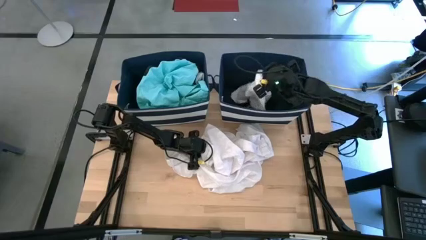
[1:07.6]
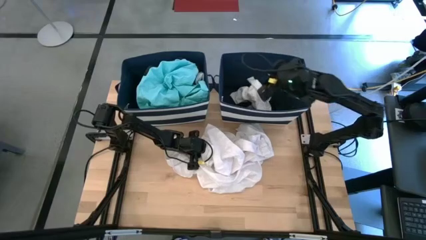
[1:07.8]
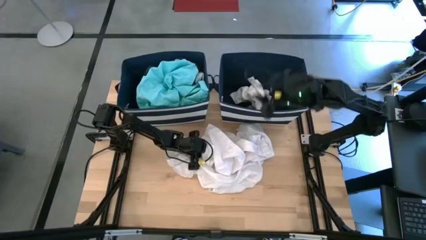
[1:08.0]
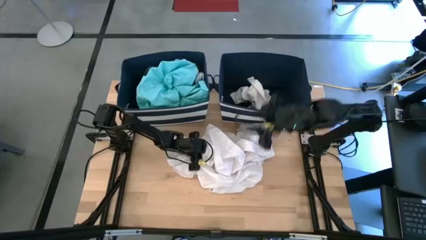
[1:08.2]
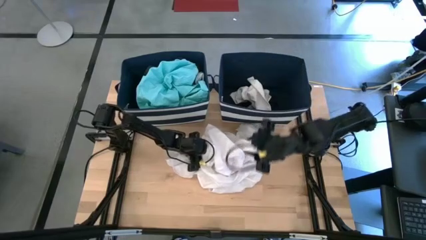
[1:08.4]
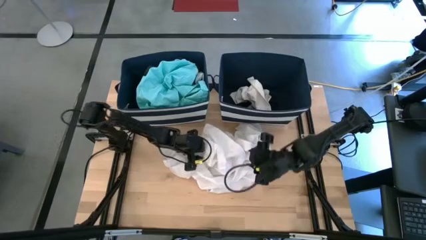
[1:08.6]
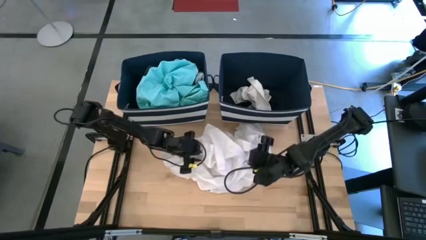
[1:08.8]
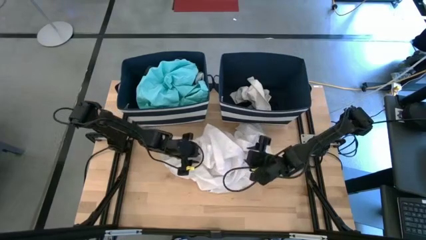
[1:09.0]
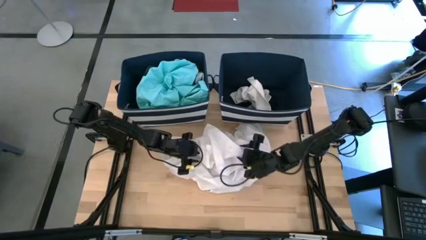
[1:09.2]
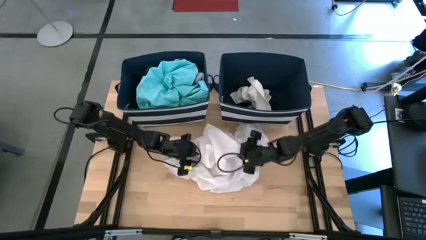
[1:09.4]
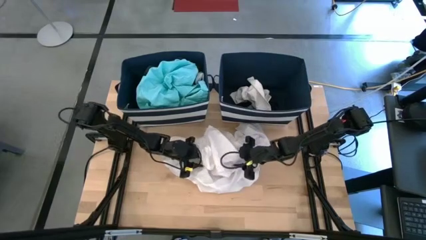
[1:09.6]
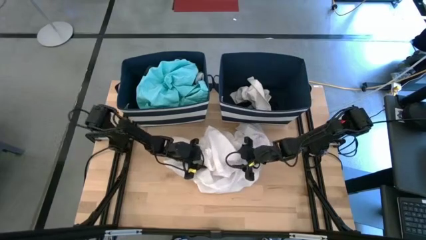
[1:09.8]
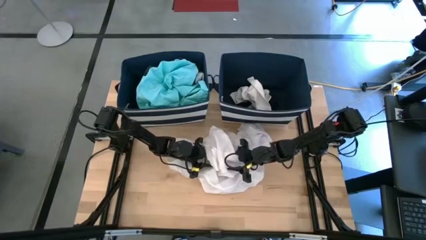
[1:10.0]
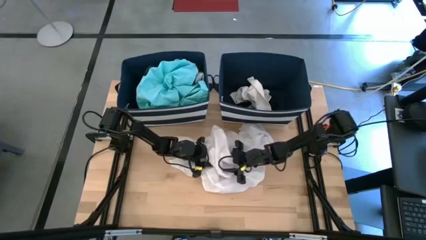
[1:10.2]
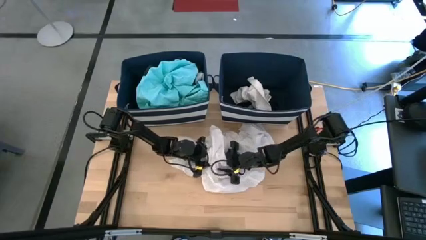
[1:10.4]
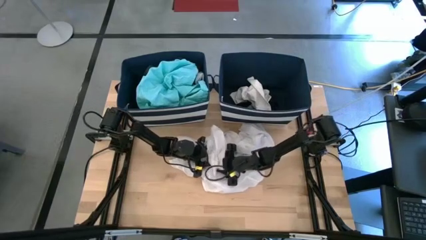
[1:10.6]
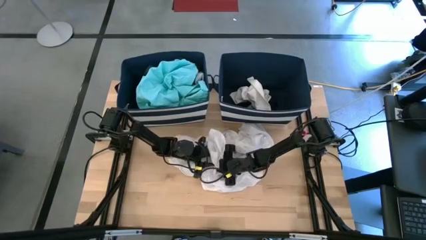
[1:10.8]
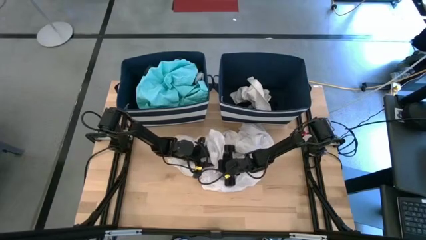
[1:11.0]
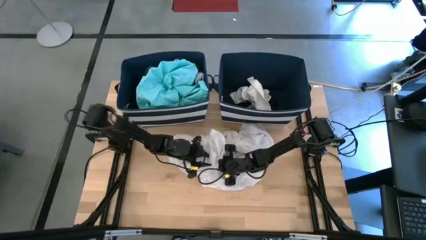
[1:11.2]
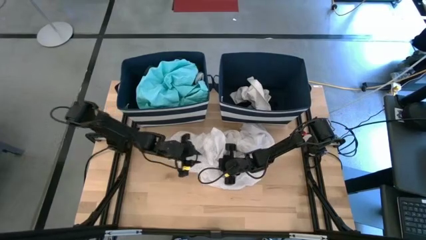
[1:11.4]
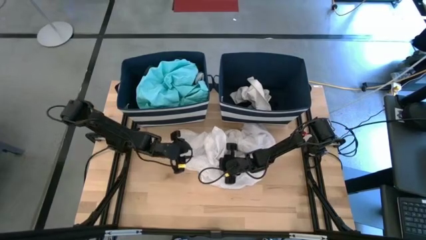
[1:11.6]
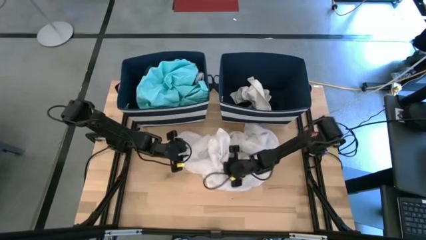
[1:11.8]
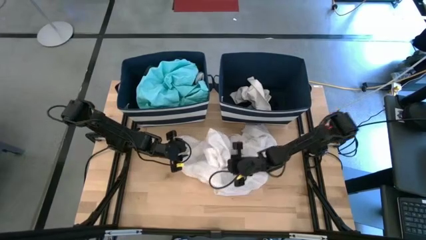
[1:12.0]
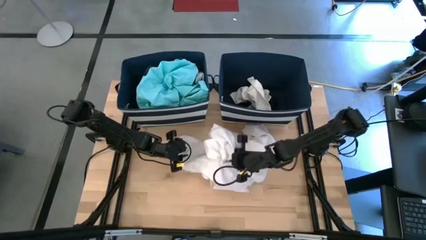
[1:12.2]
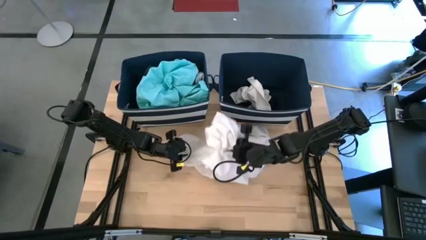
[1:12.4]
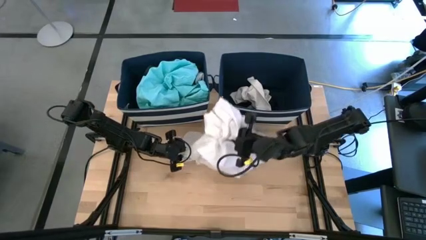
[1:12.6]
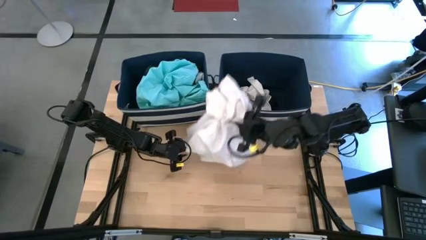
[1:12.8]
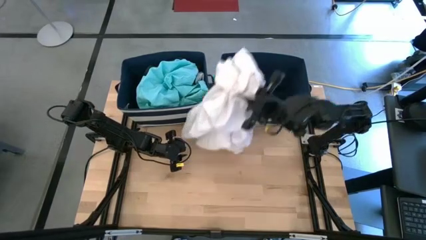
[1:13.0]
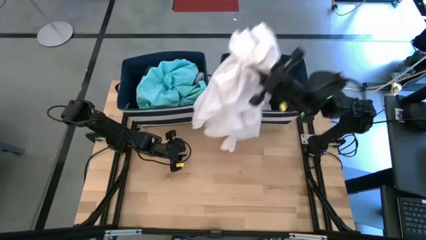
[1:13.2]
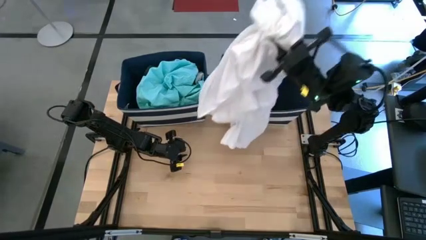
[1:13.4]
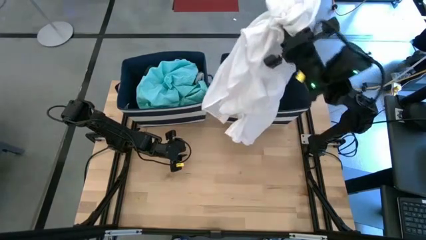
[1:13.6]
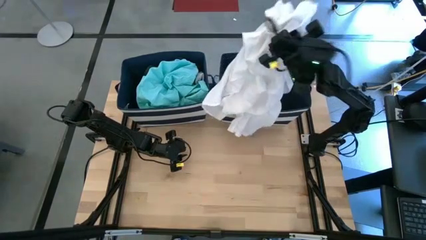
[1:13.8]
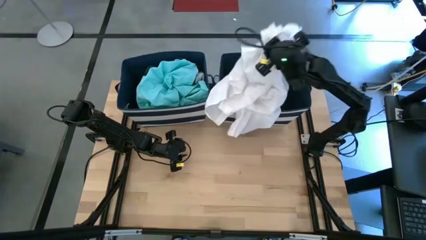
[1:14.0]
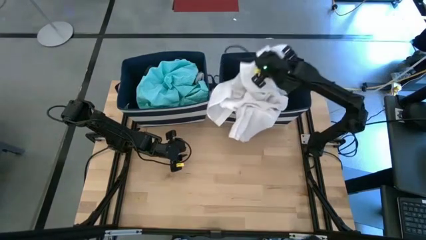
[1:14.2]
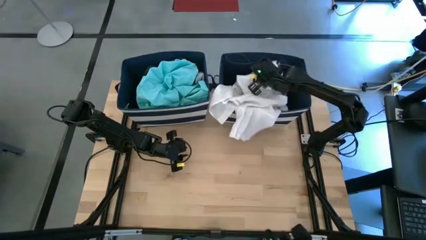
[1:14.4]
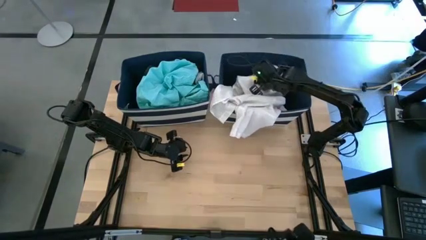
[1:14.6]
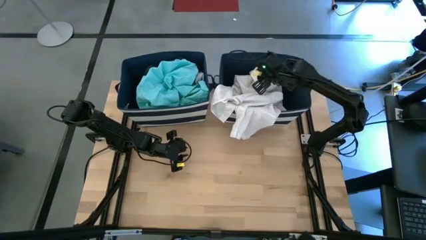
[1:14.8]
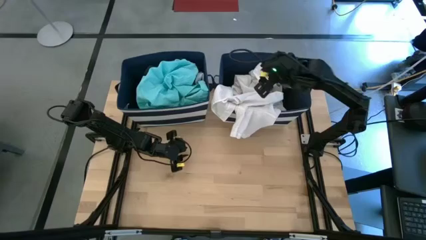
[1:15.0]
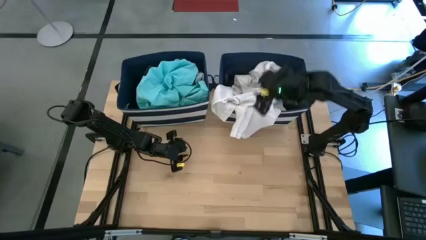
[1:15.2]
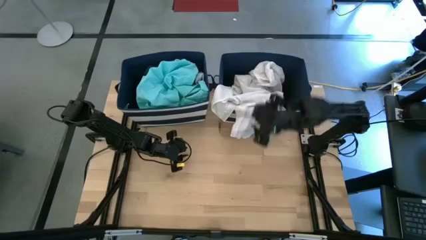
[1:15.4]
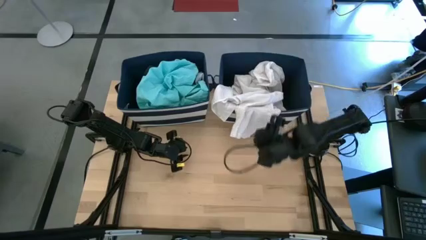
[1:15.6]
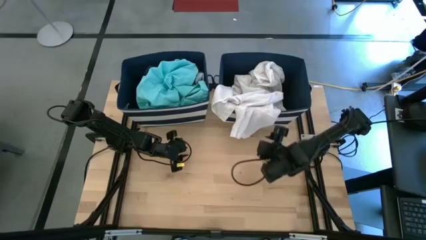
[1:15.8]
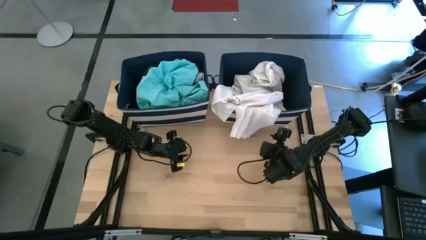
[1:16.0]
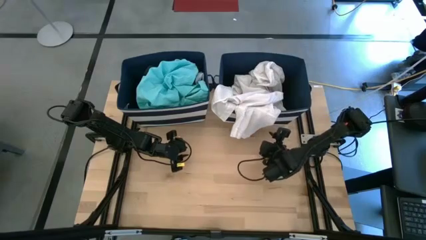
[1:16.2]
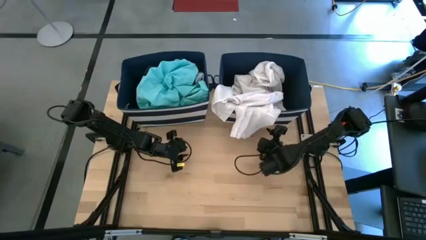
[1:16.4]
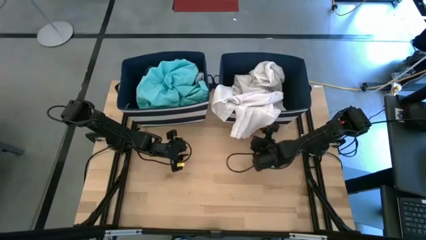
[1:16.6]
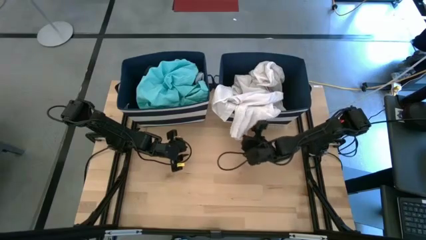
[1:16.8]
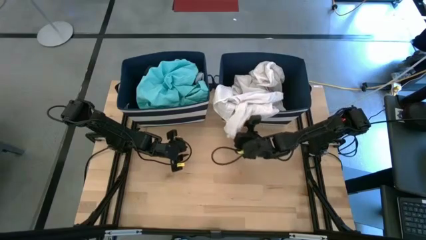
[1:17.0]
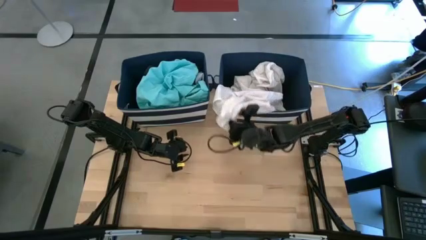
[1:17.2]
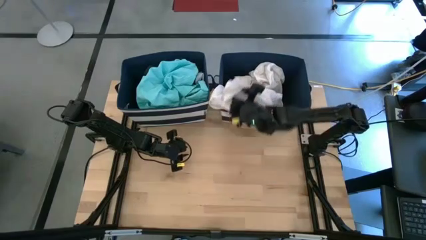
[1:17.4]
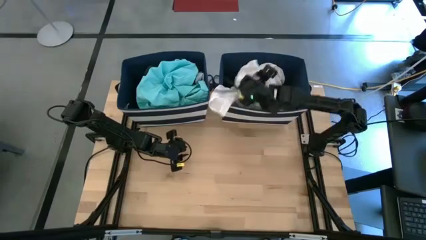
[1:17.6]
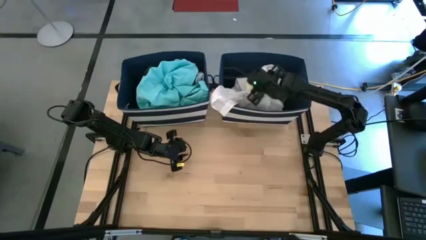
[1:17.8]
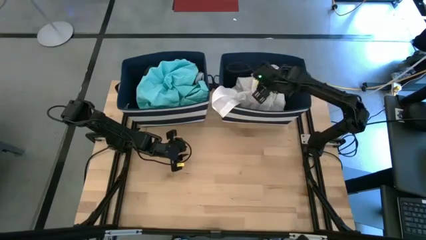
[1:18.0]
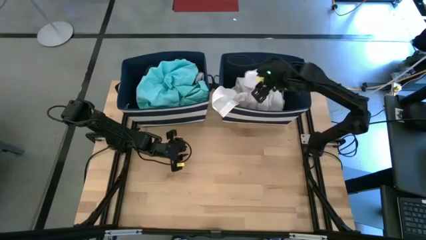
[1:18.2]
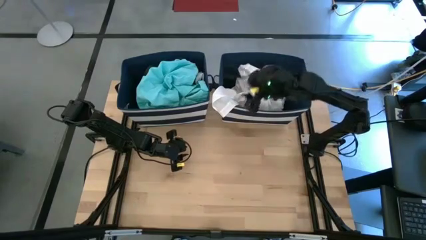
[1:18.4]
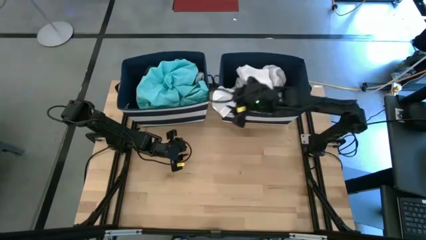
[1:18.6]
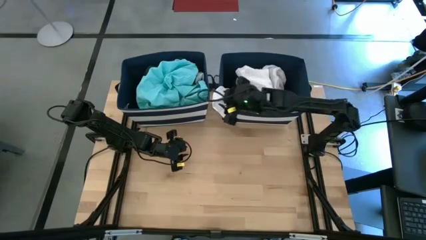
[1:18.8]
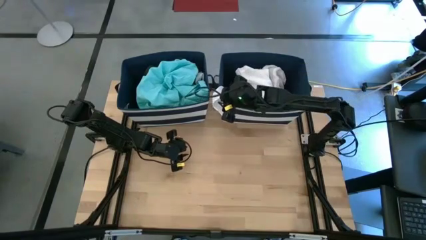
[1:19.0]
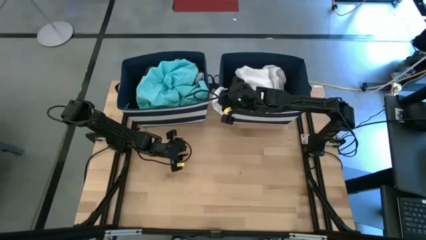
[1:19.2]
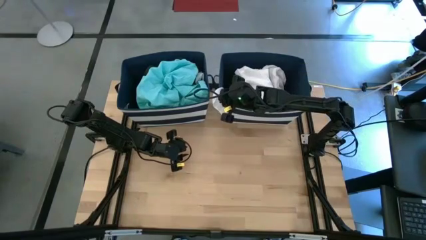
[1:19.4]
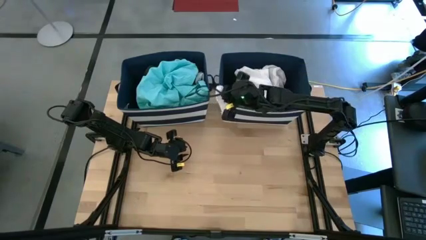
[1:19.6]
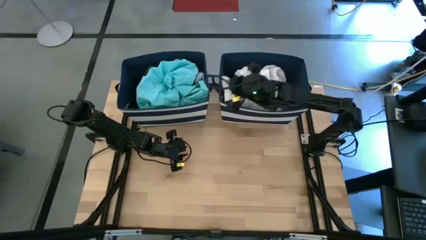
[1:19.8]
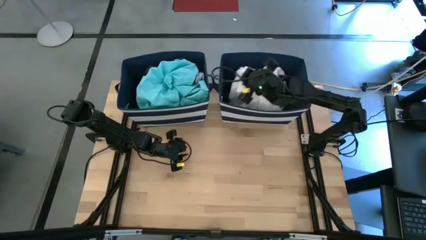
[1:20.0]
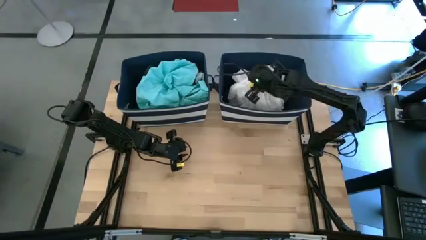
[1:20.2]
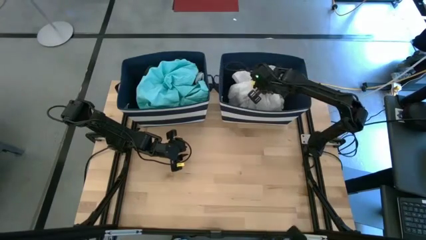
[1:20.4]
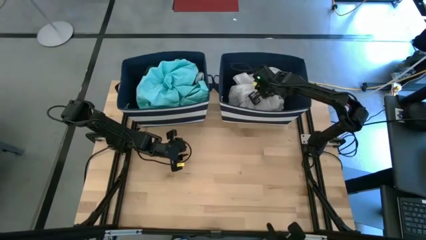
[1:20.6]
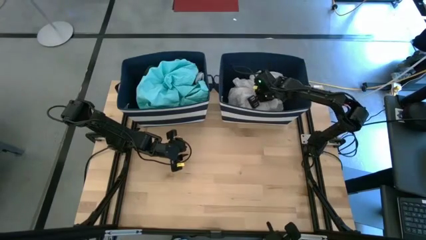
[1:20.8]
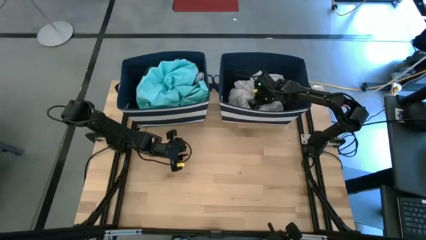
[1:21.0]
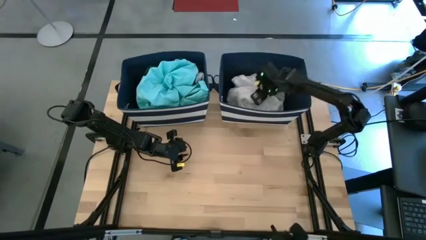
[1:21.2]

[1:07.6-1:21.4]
Task: Sort clothes
Put the white dress into the right blue bin

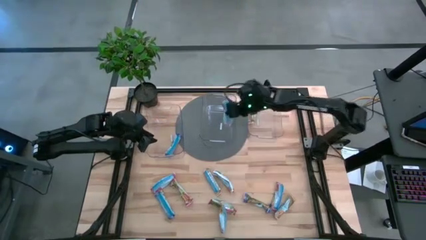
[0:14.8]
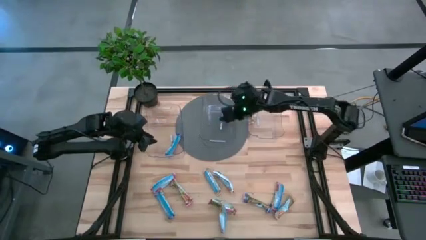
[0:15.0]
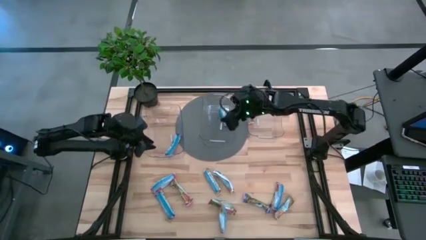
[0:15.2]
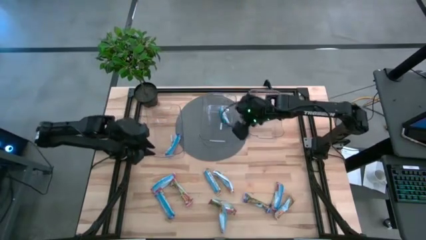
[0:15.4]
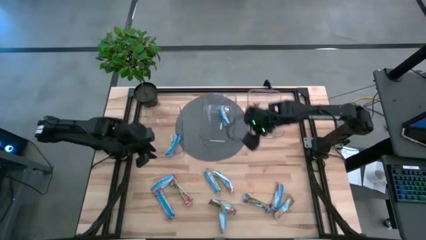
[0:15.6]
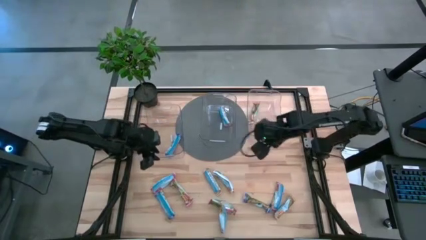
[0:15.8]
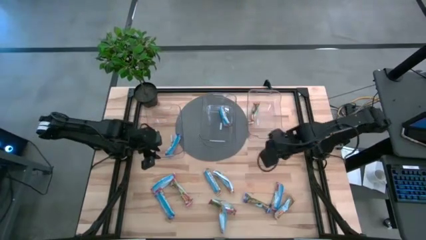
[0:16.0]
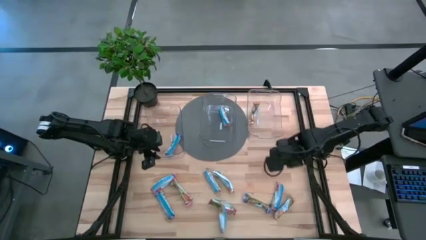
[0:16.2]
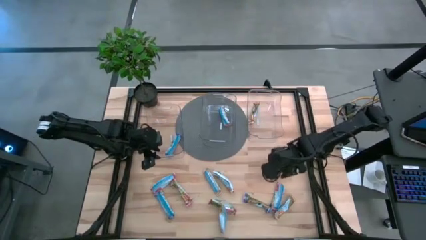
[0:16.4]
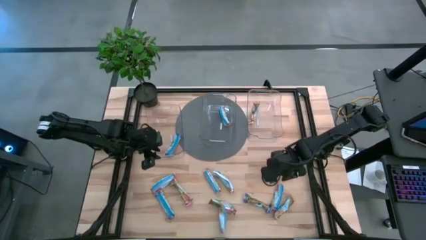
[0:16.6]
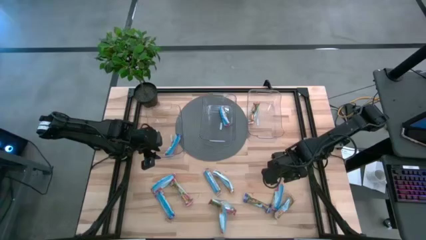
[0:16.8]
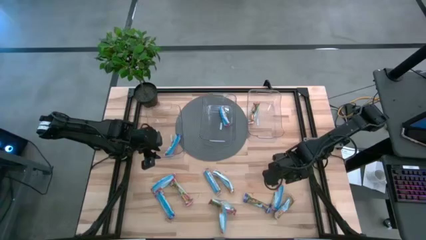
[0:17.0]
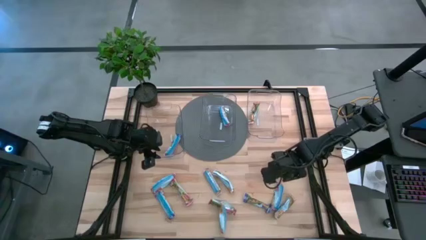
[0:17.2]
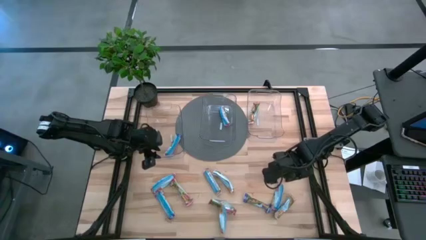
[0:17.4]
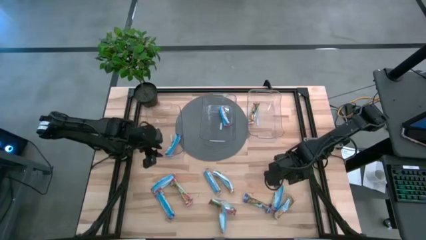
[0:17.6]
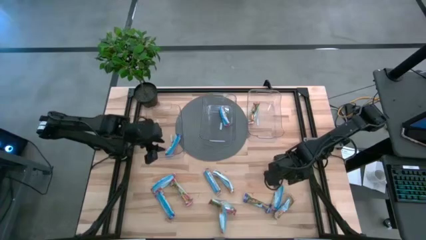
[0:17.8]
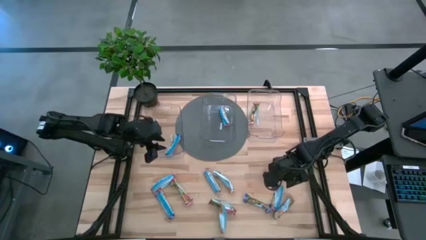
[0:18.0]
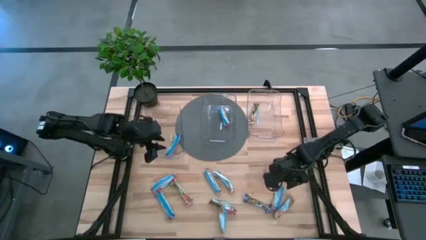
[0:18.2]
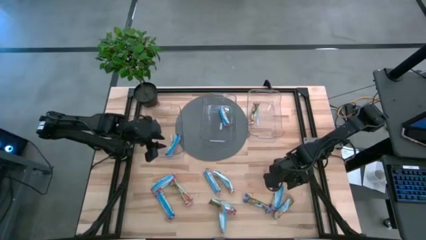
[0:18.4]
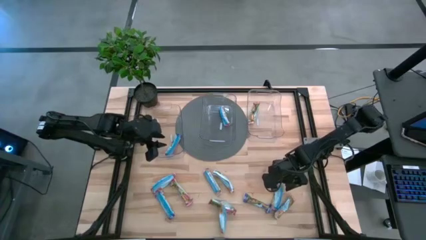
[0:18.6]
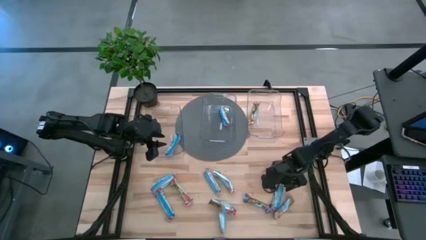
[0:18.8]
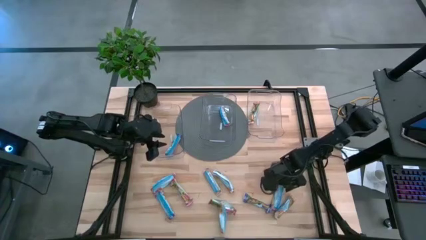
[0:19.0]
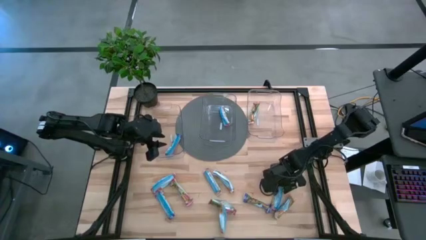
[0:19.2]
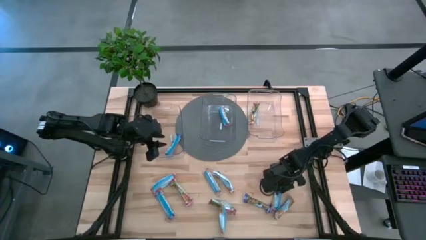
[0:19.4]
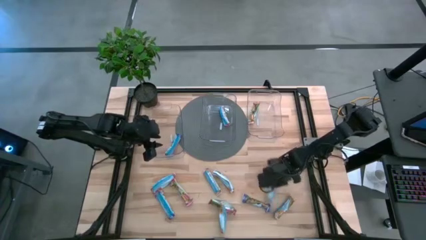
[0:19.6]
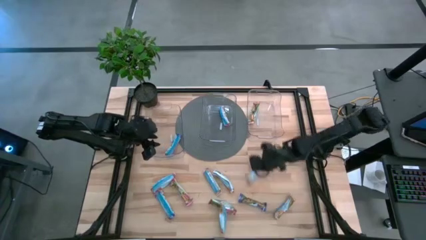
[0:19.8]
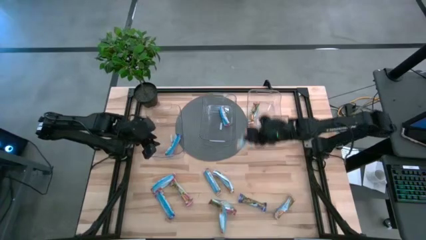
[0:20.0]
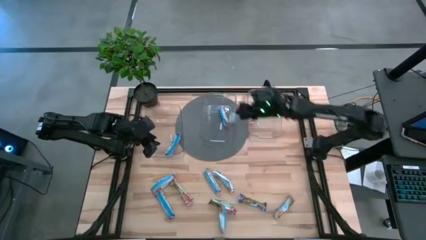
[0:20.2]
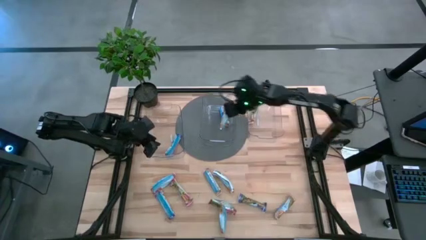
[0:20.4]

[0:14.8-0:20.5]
Task: Pick and place Granola Bars by type
Put the red granola bar into the middle transparent bin
